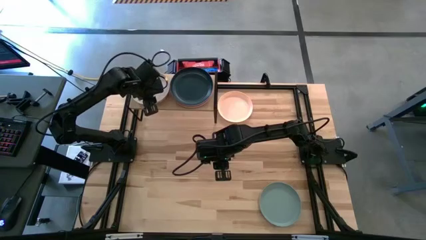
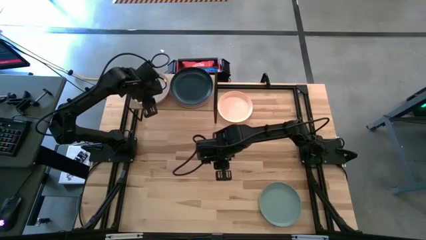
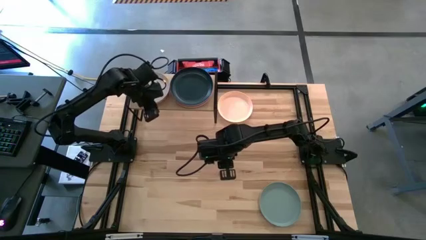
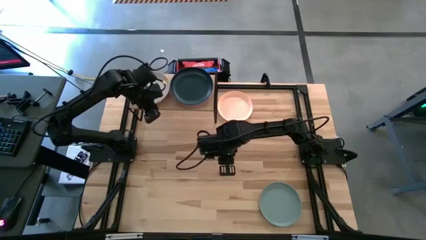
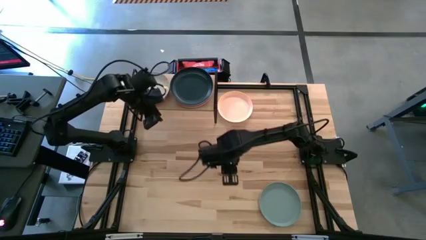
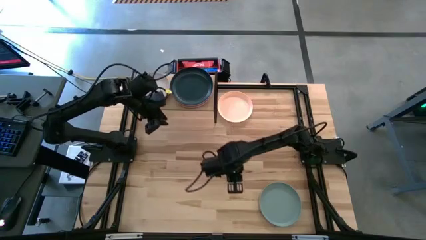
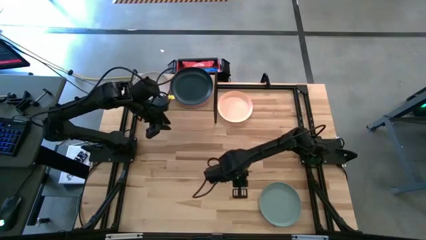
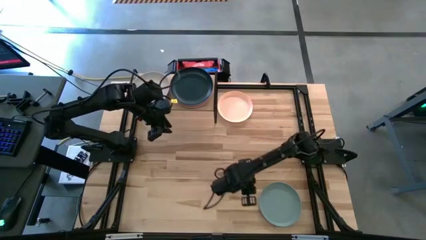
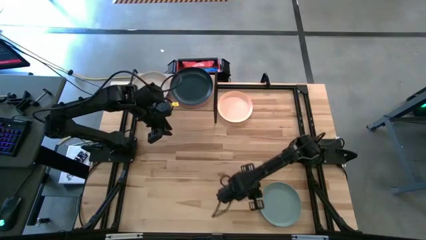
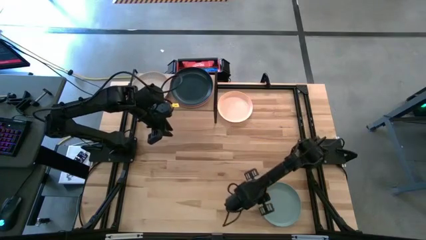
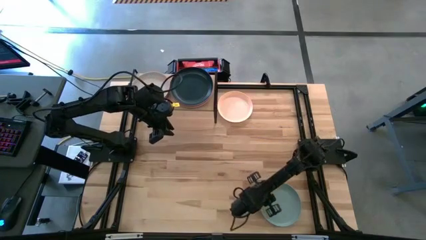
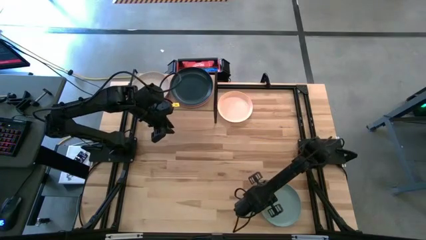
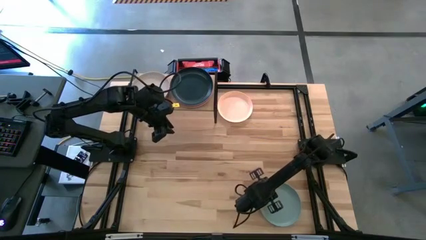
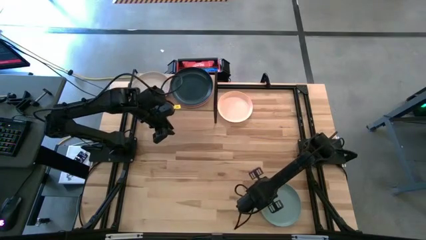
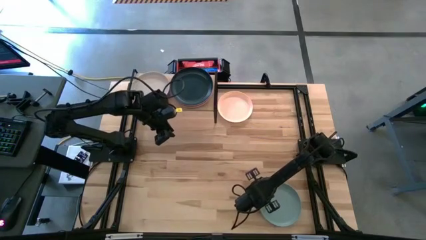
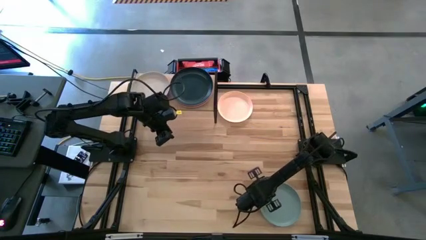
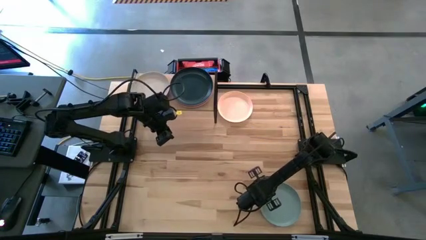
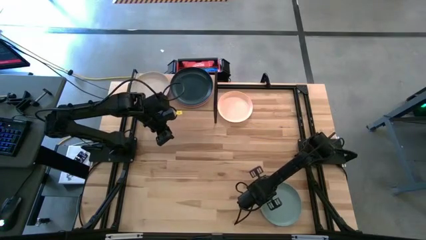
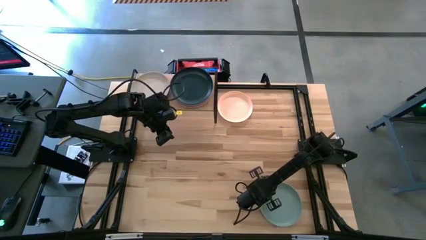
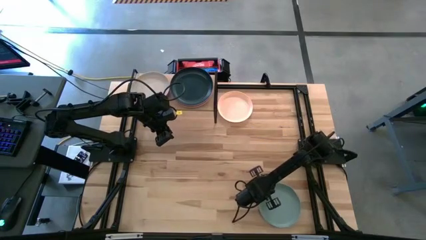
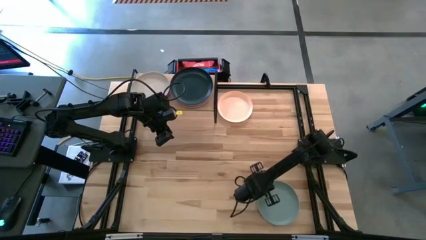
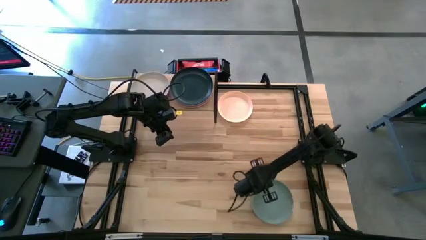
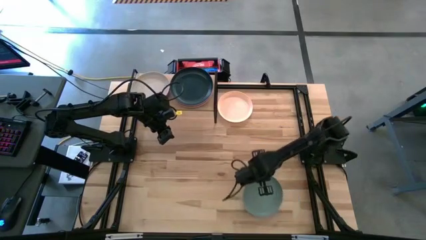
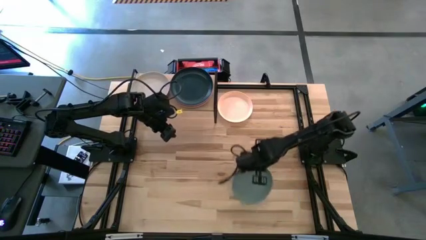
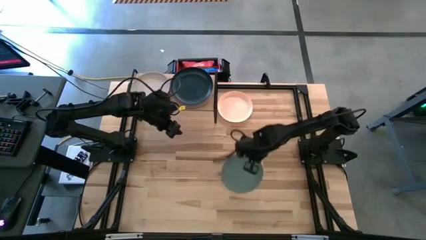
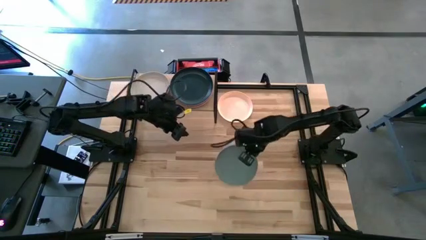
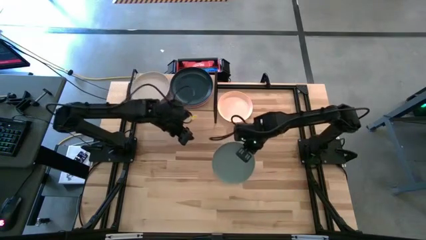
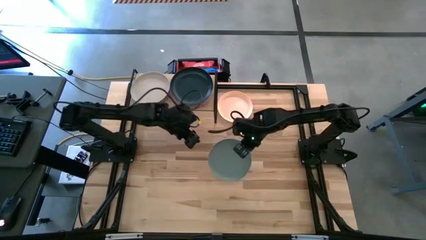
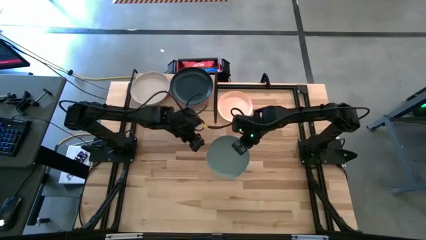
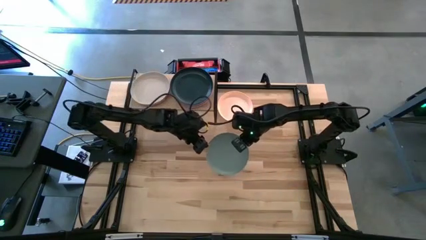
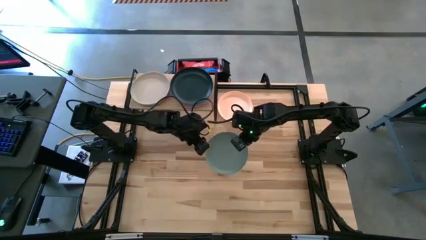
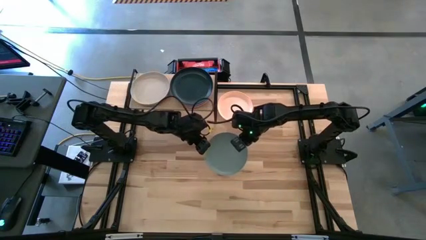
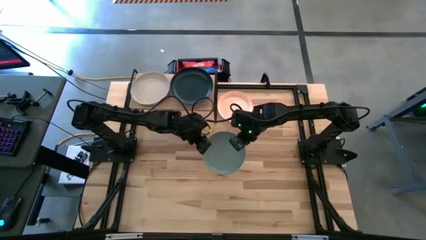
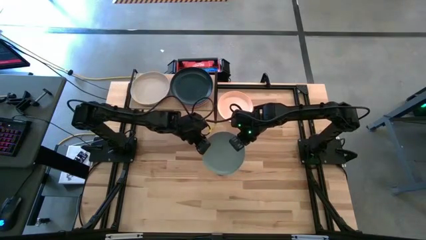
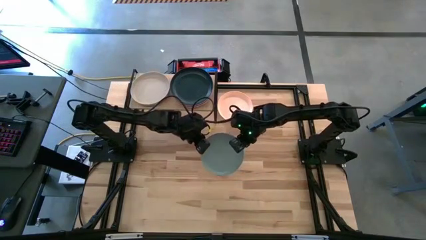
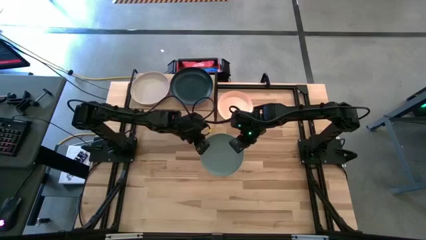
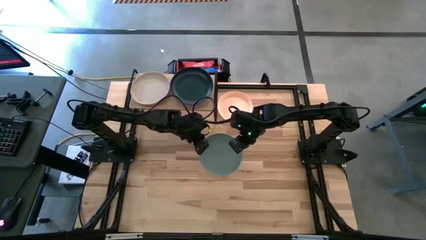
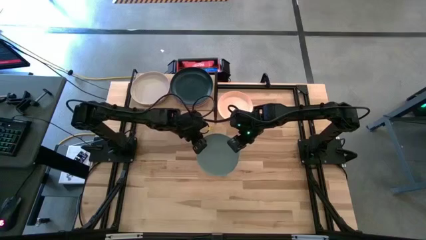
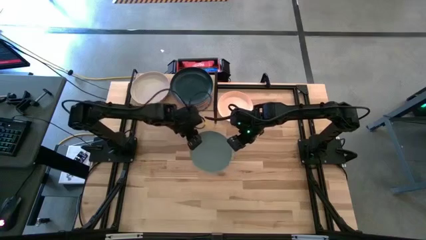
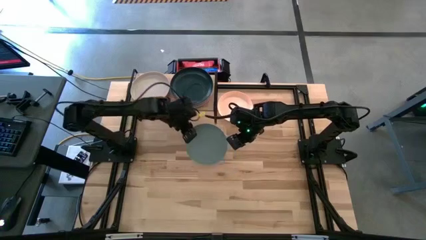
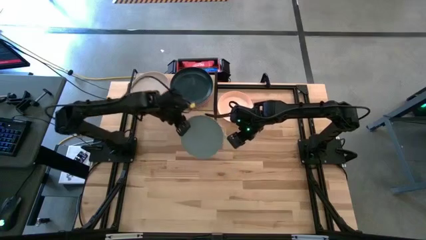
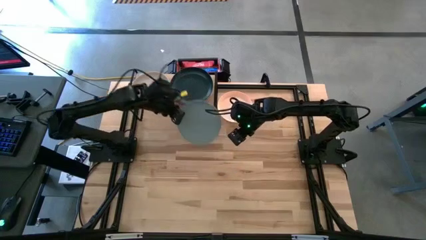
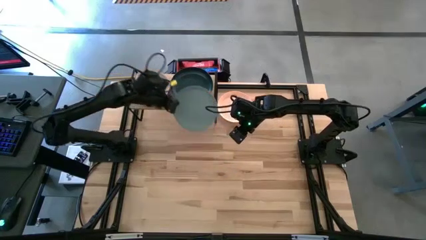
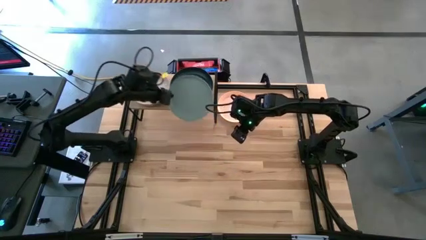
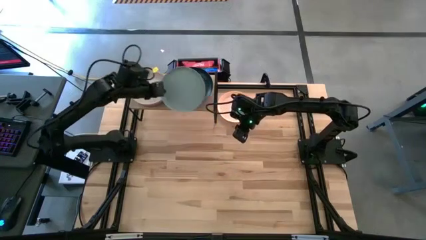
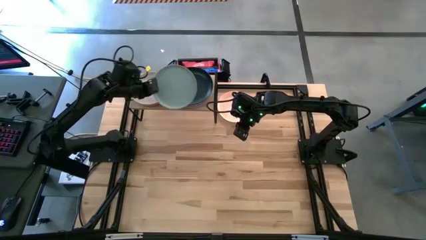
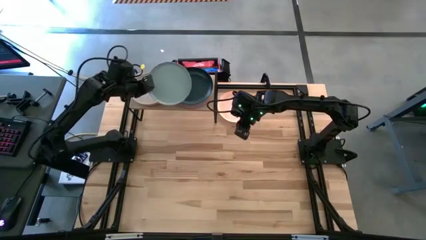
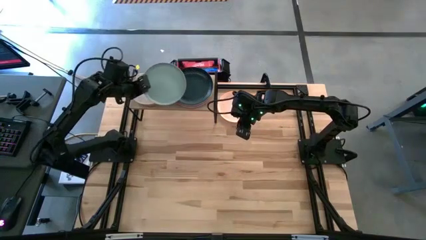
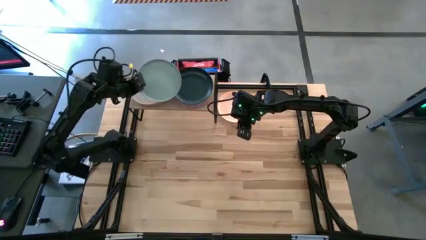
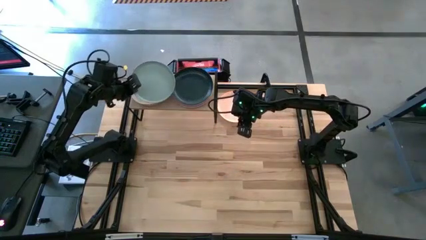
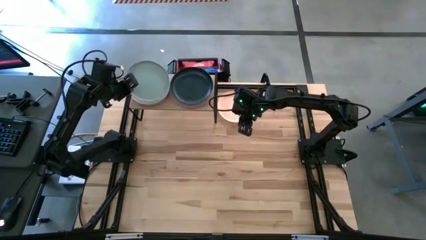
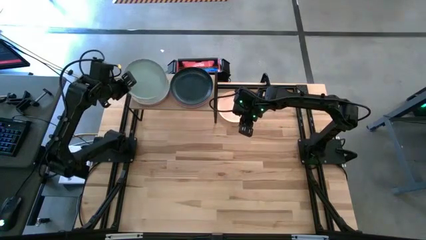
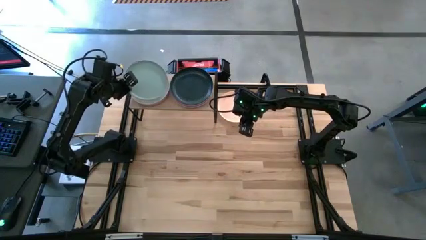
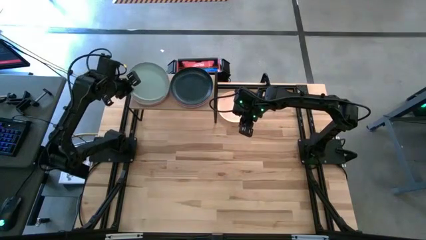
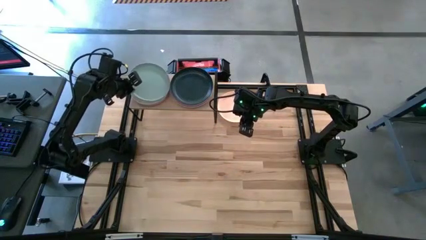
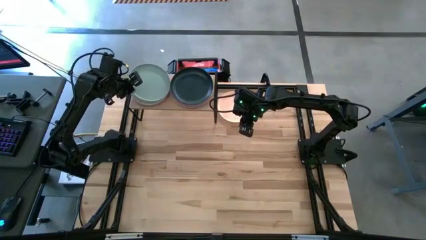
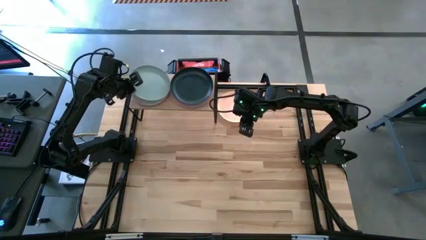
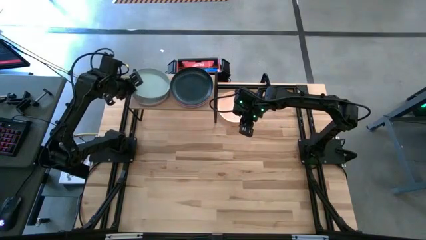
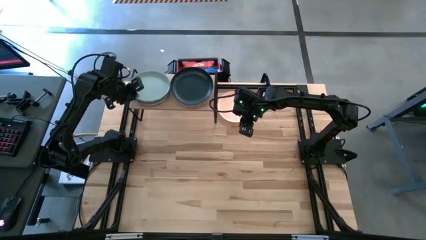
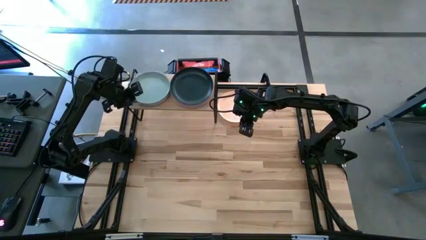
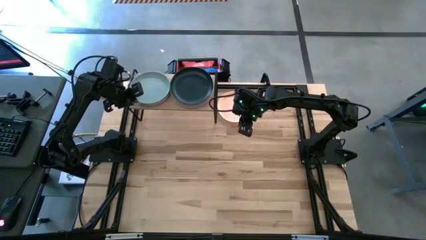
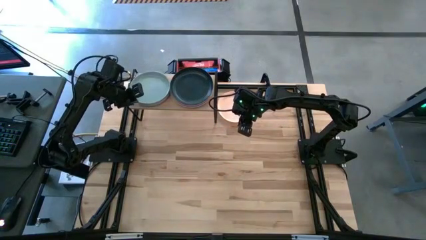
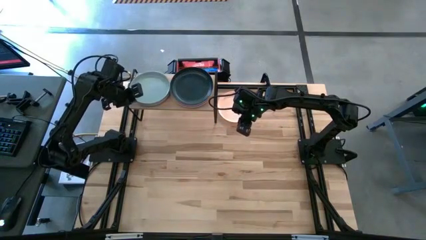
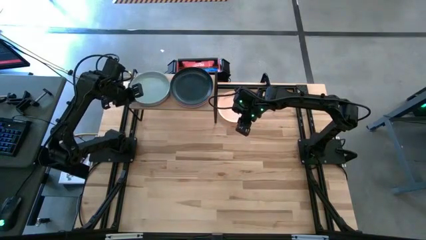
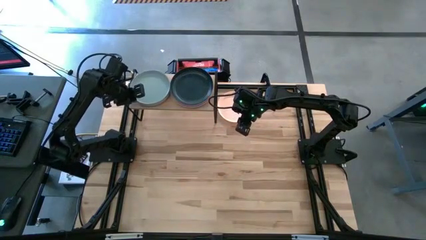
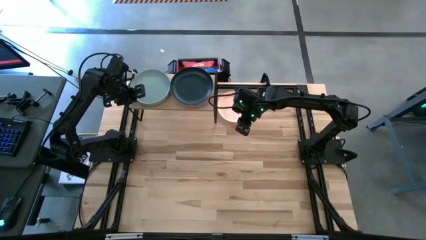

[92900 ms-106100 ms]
Task: Place and stack plates onto a shelf
Stack the light blue plate on top of the white plate on the shelf

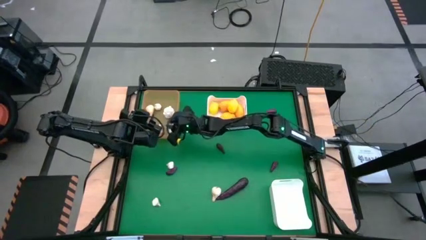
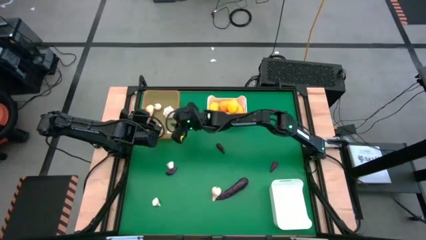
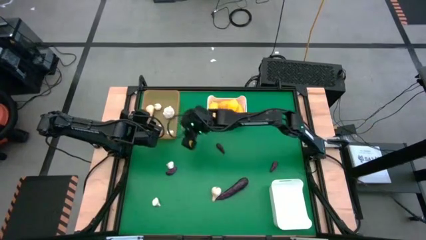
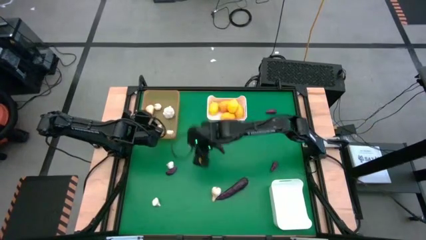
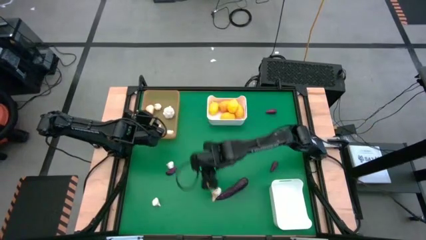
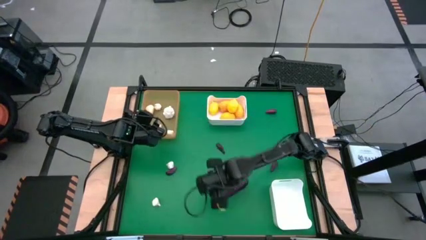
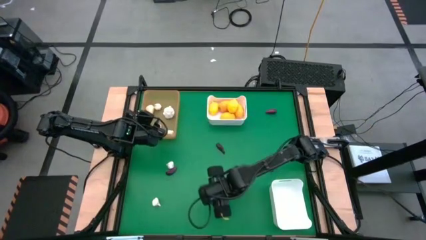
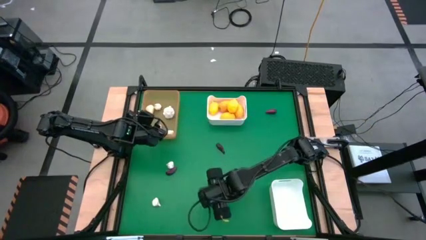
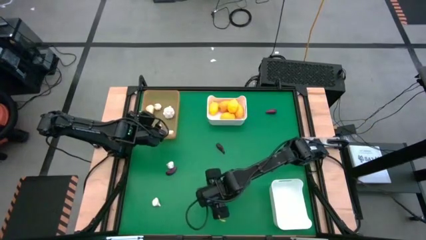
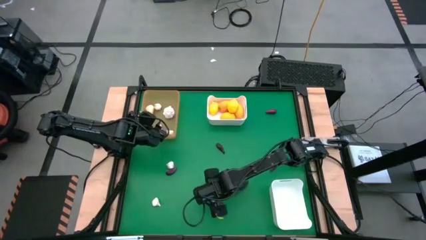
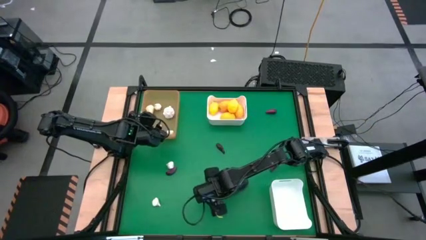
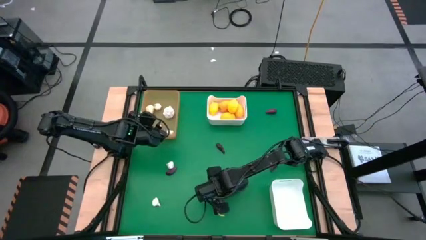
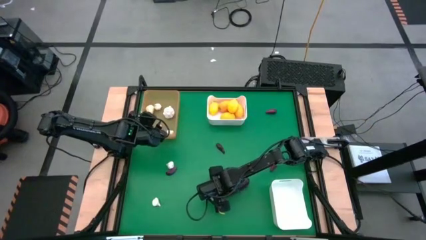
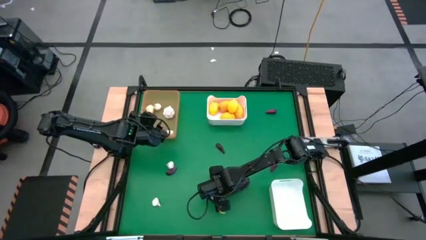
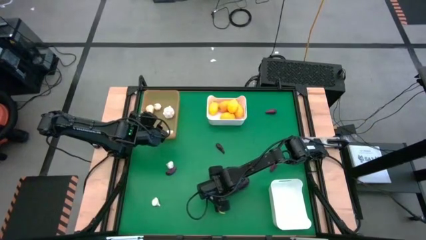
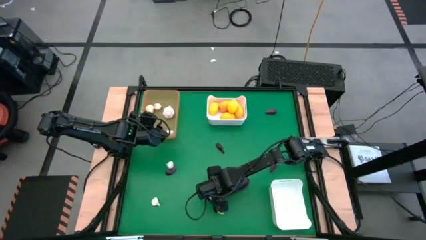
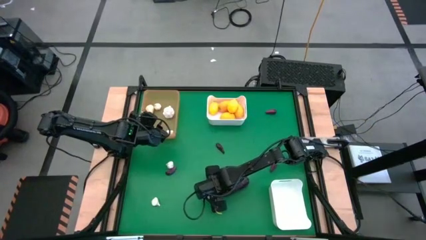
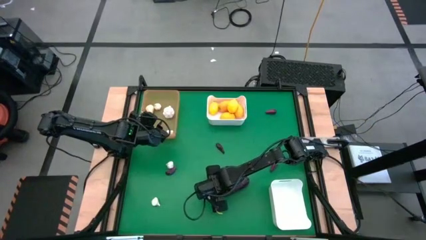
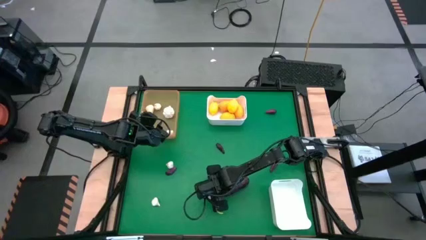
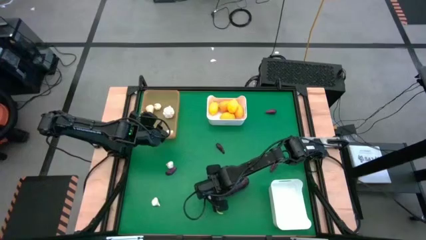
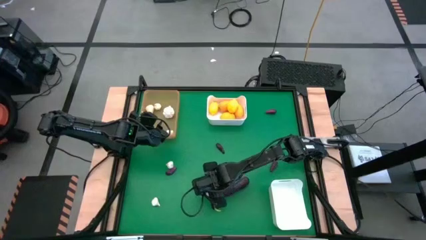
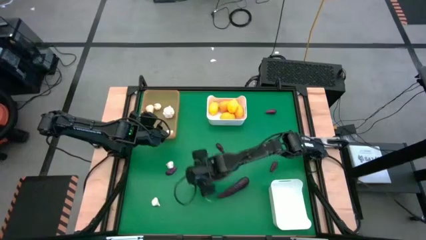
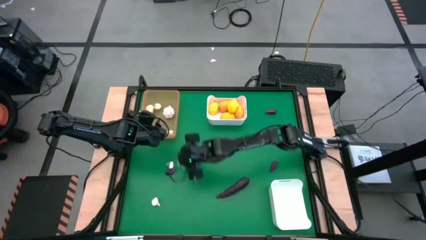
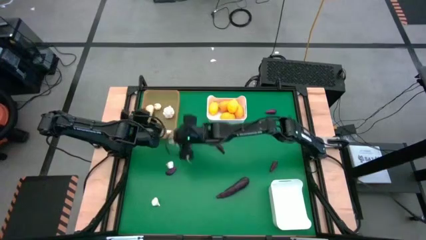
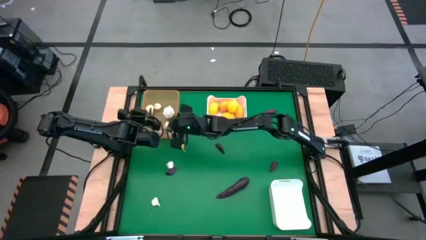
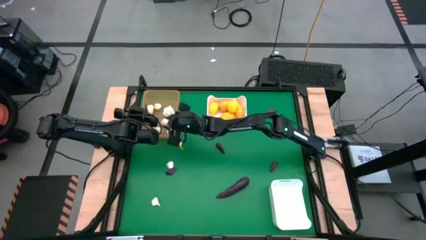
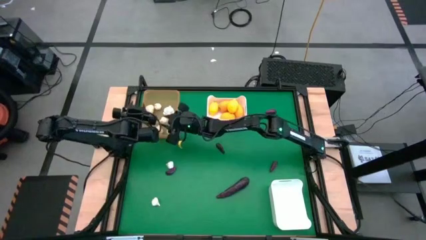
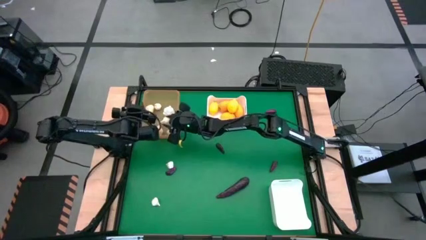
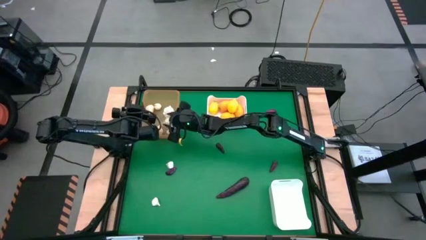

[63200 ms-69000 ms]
Task: Sort produce into baskets
Put the garlic into the orange bin
